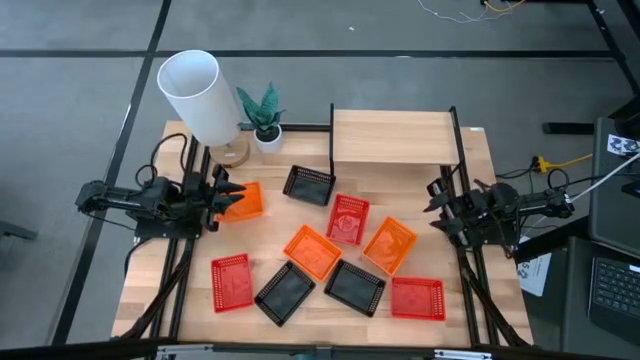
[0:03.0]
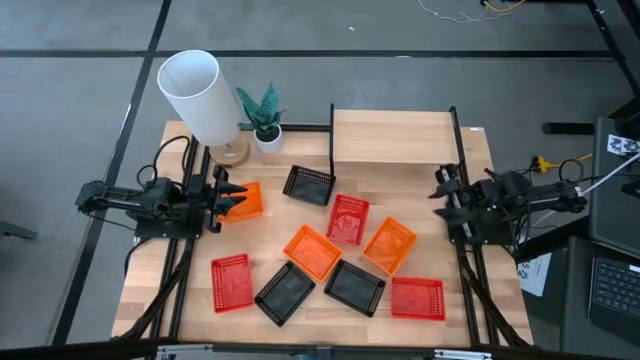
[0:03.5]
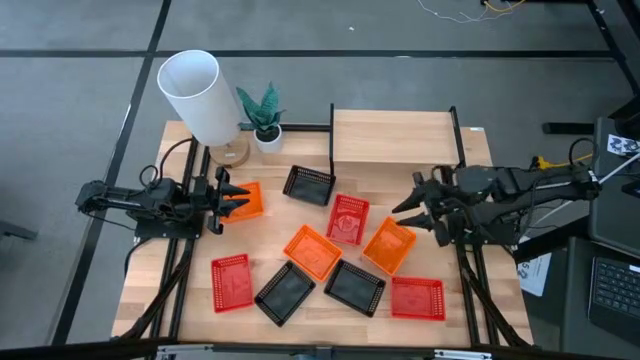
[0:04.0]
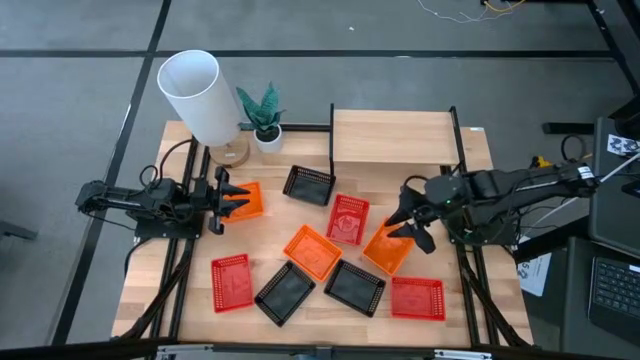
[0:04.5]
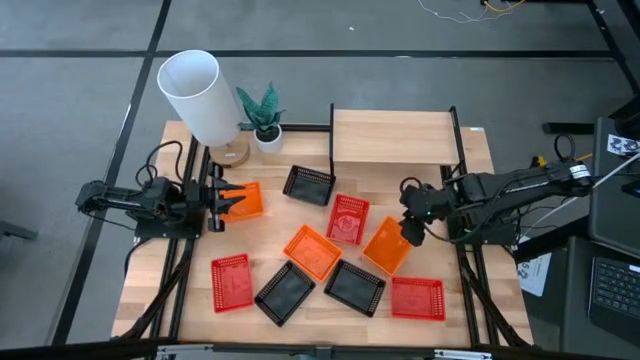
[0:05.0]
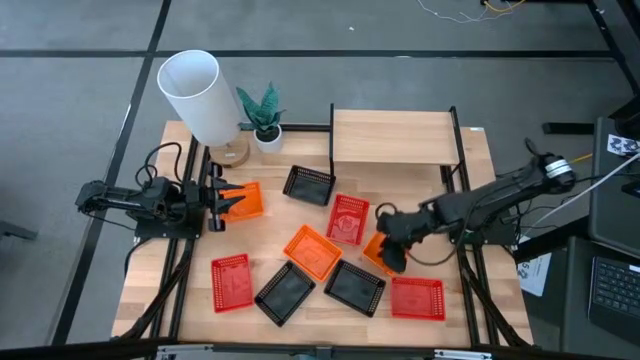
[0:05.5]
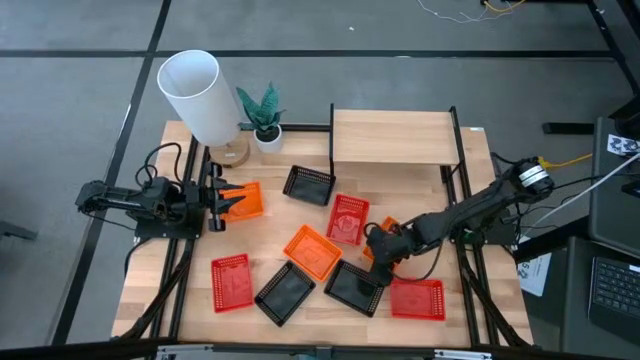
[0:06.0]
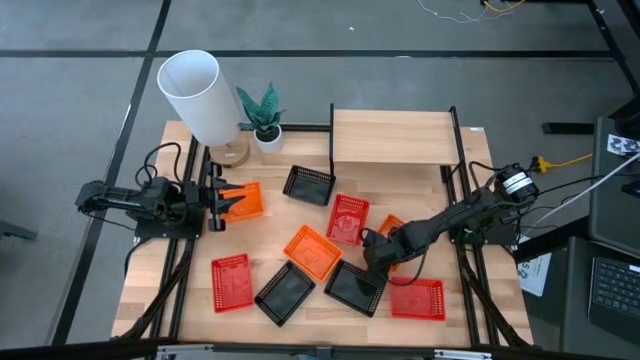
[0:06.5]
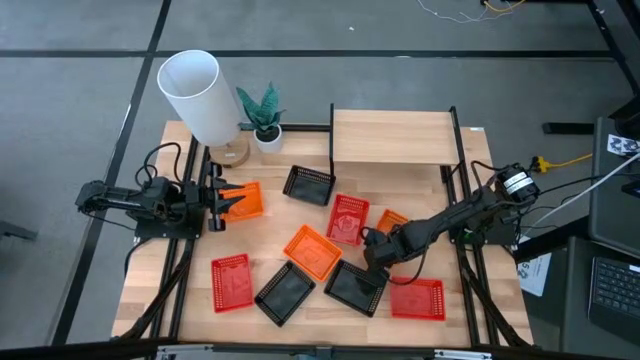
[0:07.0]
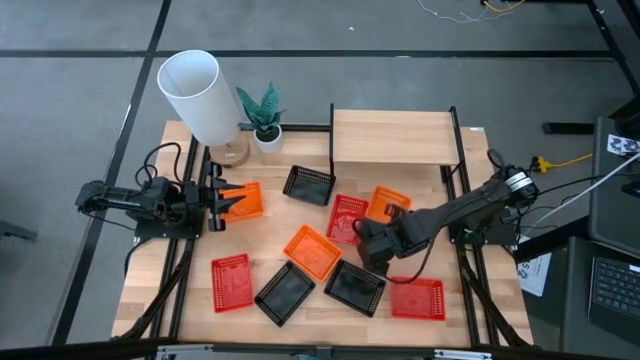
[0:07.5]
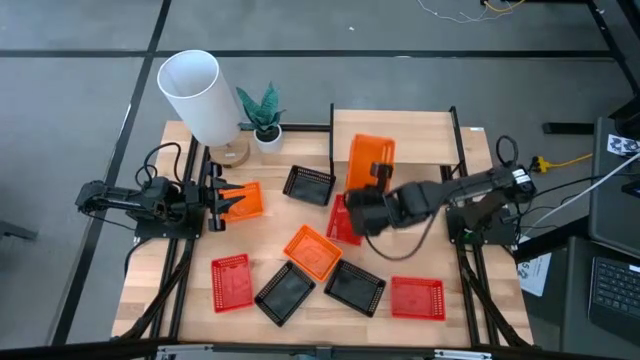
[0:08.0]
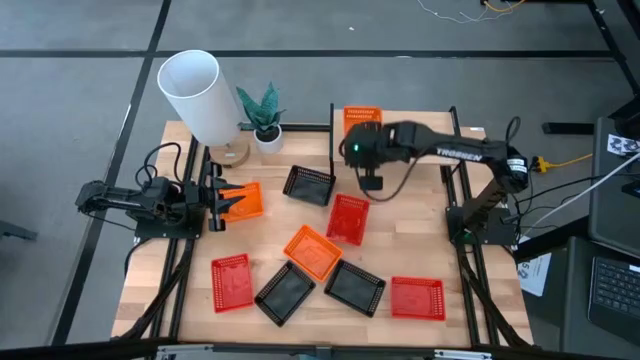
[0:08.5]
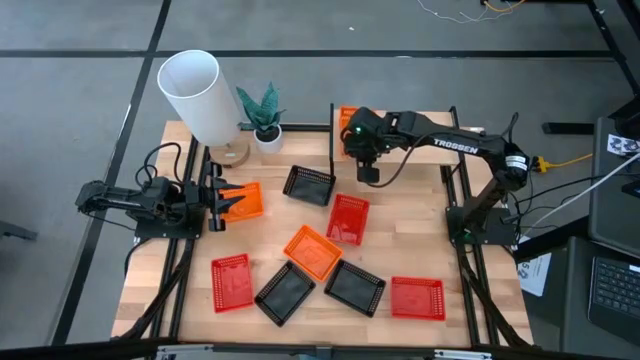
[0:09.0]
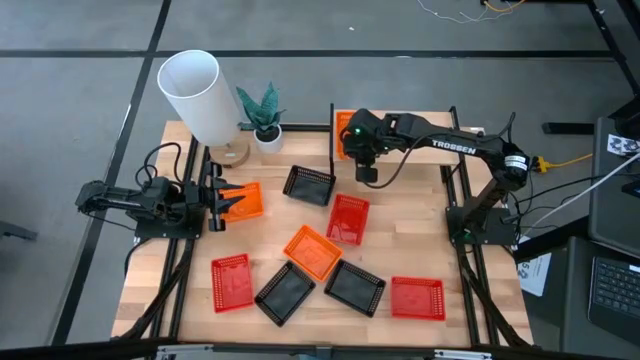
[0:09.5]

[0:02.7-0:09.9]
Task: Stack baskets on shelf by color
Put the right orange basket on the shelf

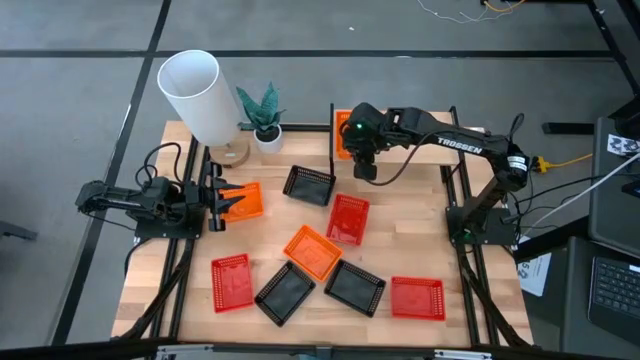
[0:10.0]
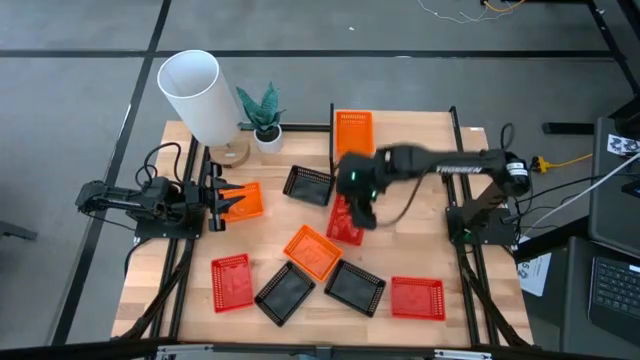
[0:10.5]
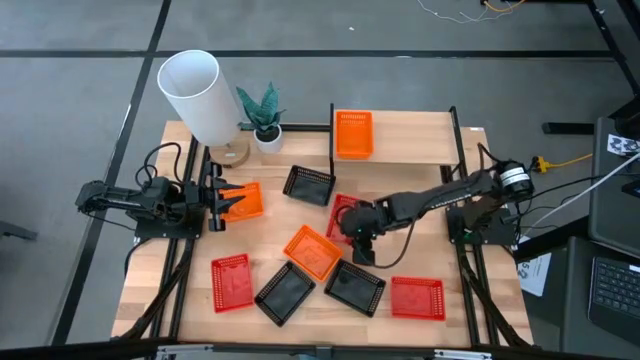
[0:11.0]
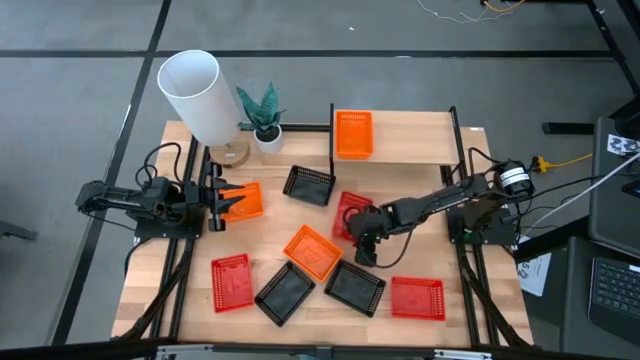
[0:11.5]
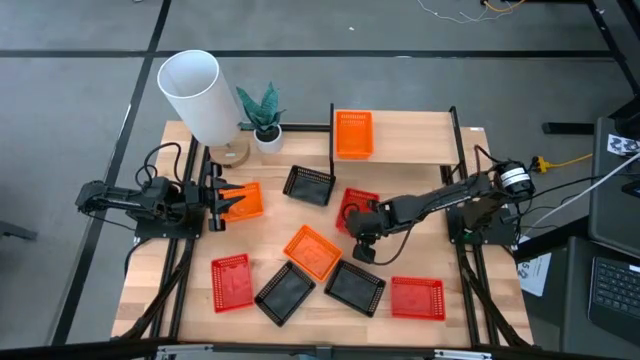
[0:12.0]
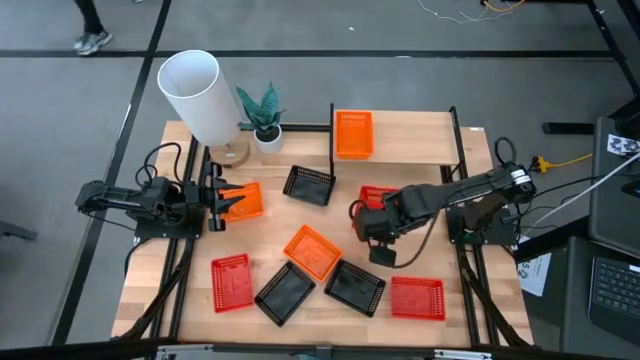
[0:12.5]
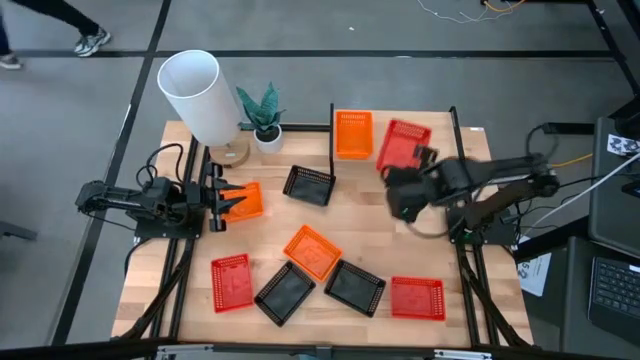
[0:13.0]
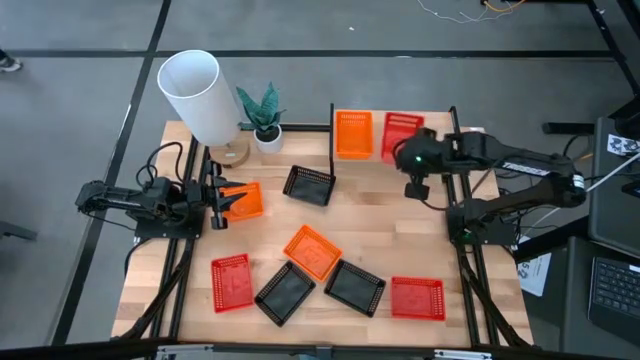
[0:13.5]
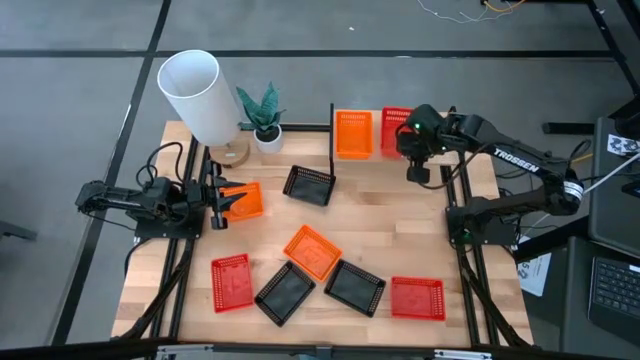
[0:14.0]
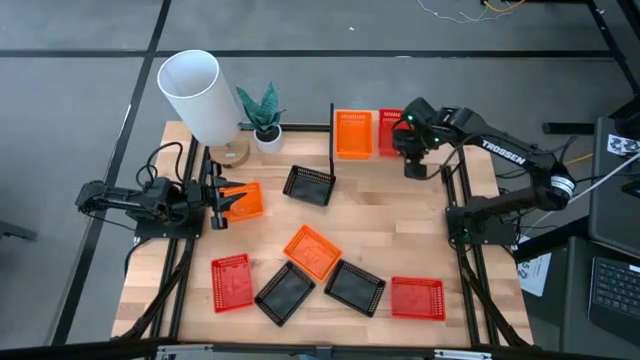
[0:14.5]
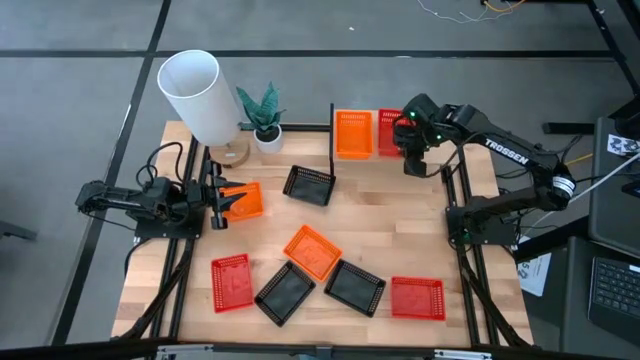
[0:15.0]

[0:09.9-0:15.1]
Put the top red basket on the shelf

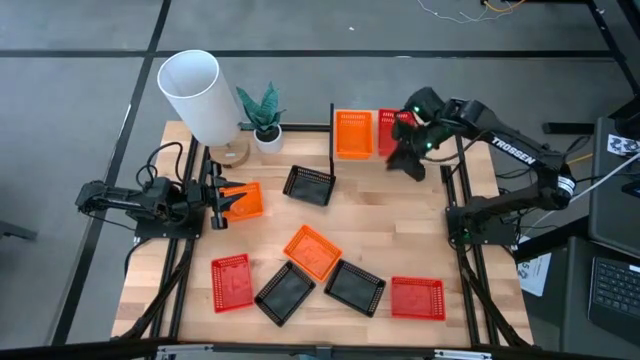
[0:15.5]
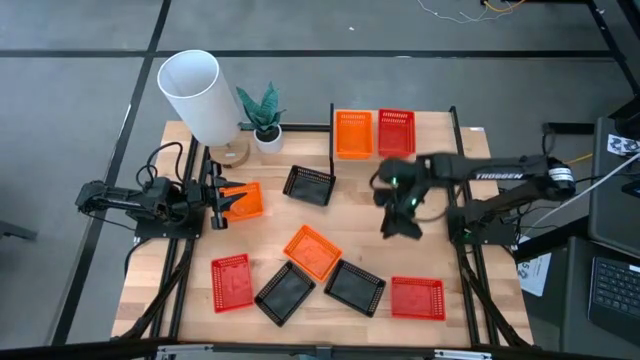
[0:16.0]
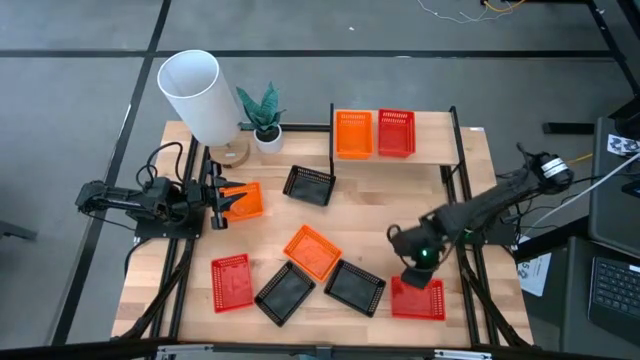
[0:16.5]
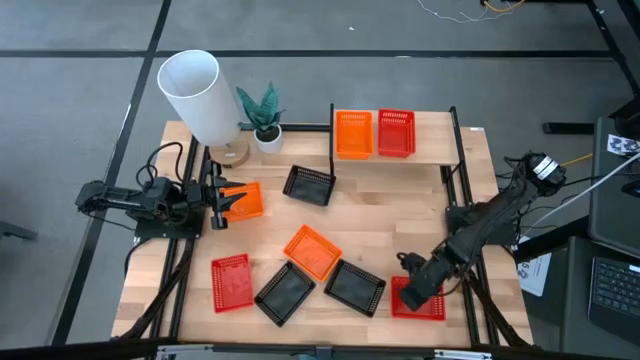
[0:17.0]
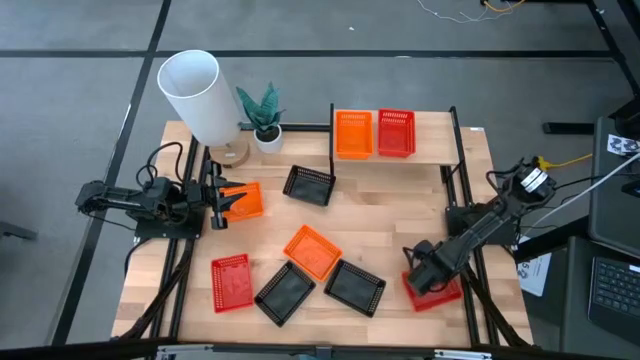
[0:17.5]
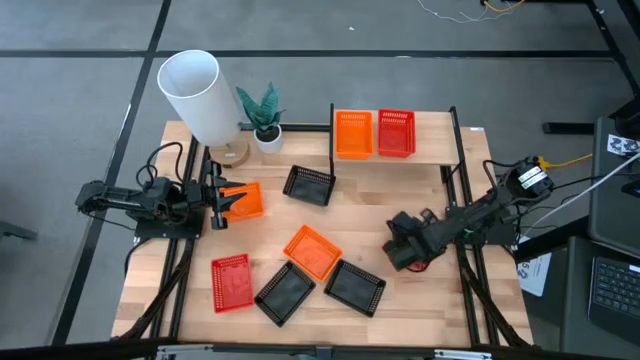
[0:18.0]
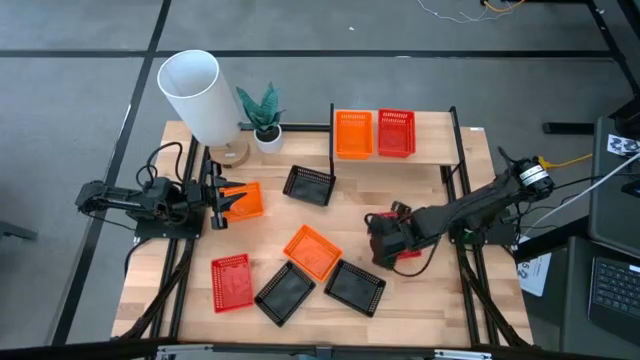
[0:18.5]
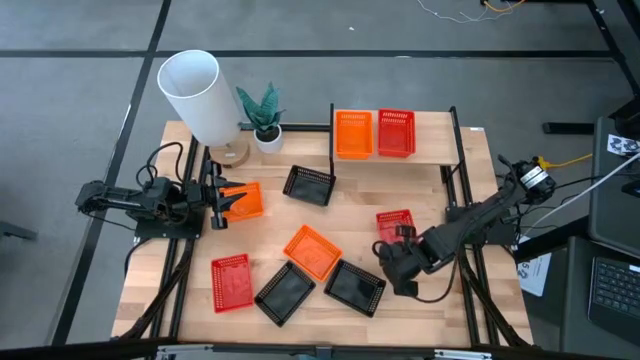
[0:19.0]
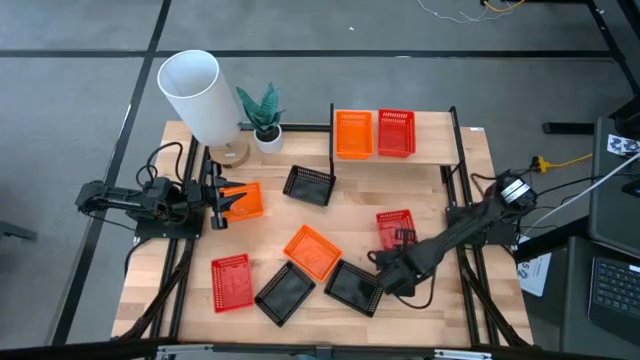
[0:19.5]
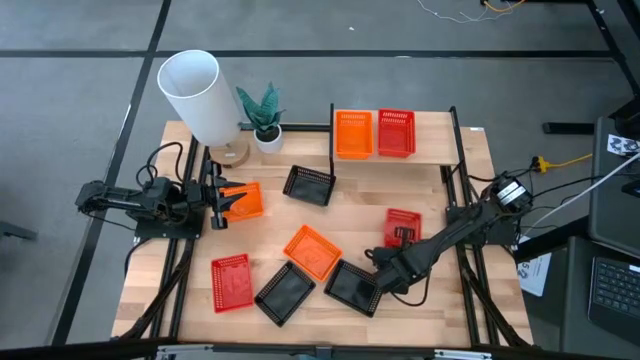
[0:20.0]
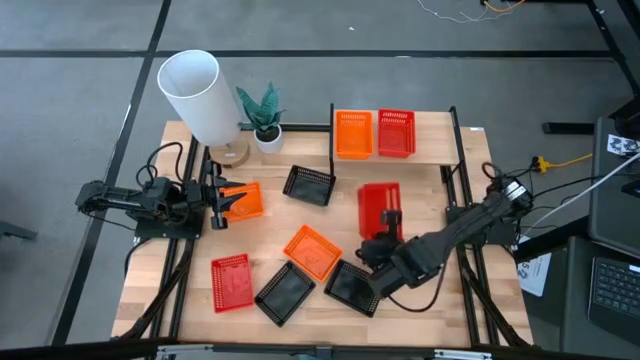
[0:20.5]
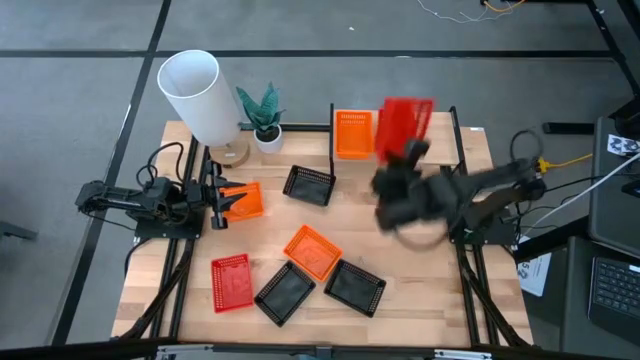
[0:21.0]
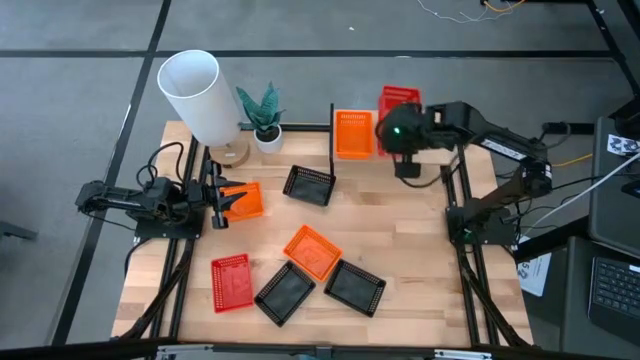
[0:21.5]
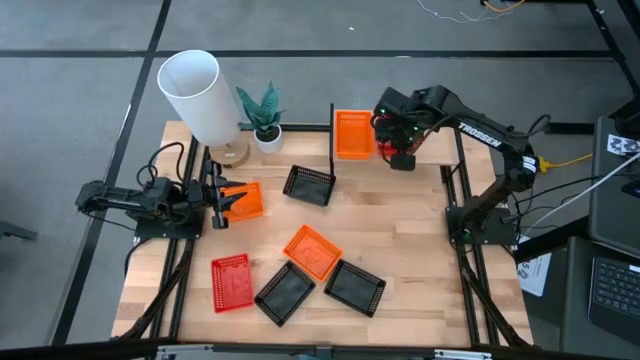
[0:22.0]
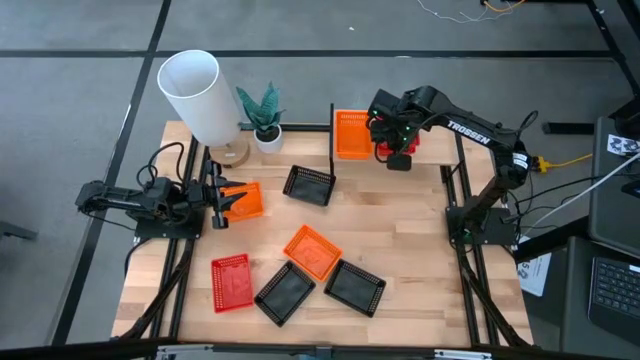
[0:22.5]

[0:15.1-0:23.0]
Stack the right red basket on top of the red basket on the shelf

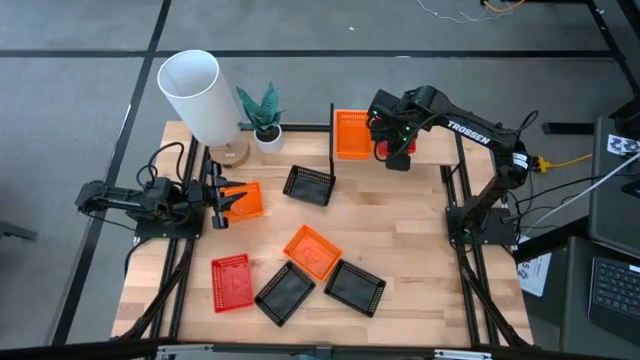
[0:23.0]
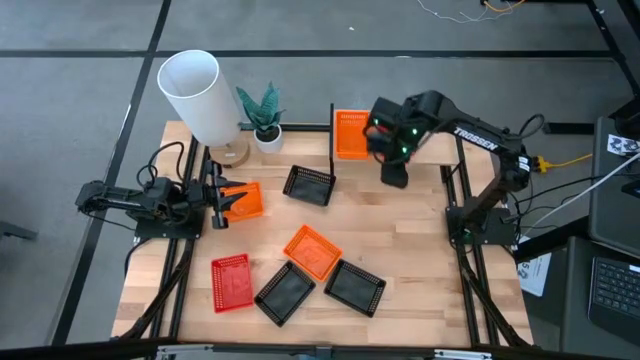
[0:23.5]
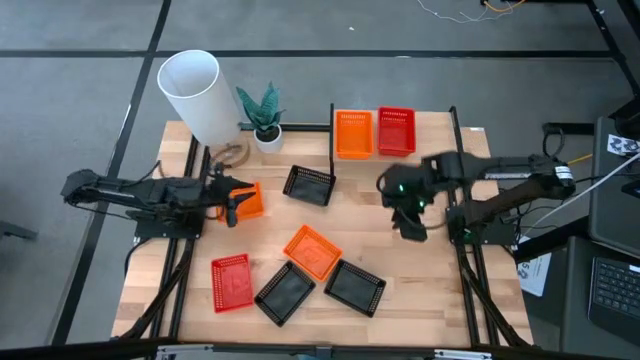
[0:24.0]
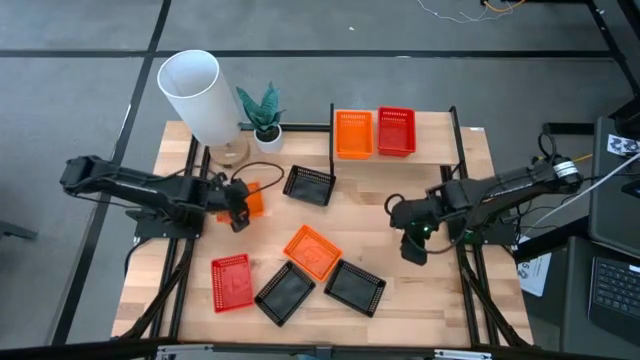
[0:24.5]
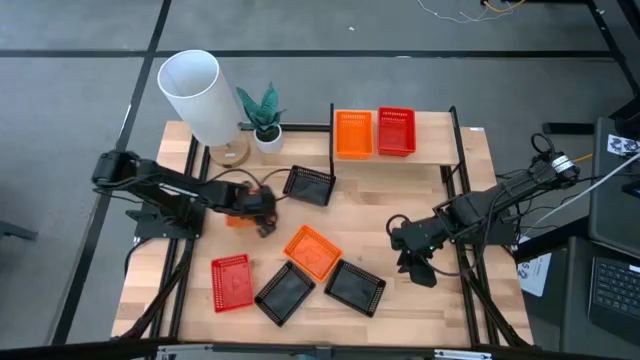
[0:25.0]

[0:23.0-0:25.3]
Adjust the orange bin
